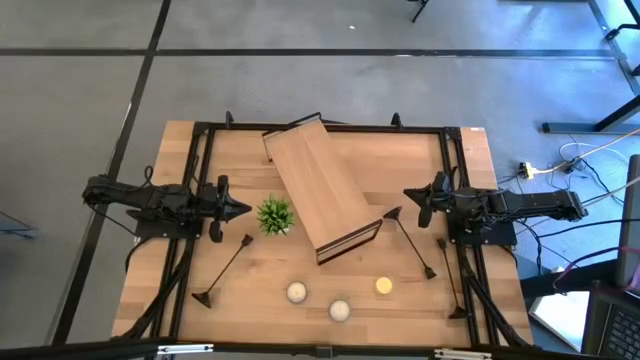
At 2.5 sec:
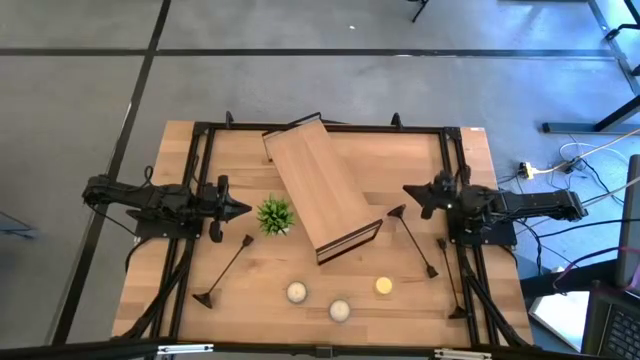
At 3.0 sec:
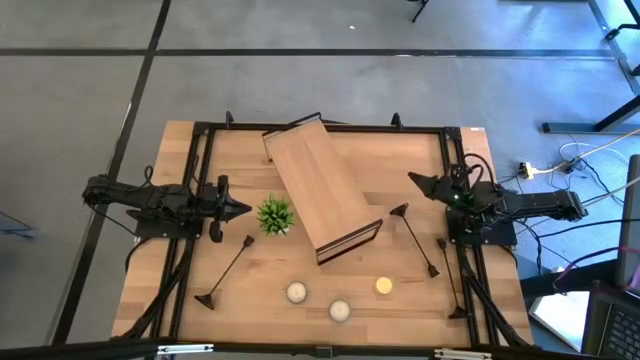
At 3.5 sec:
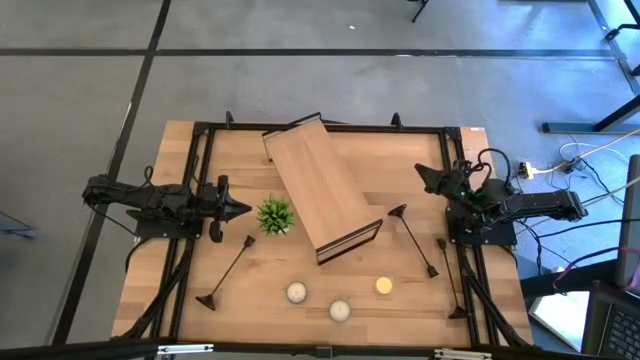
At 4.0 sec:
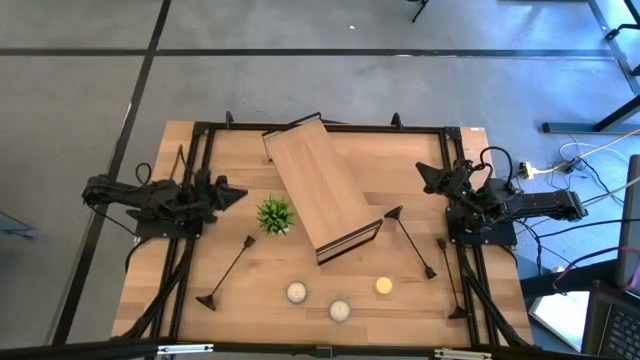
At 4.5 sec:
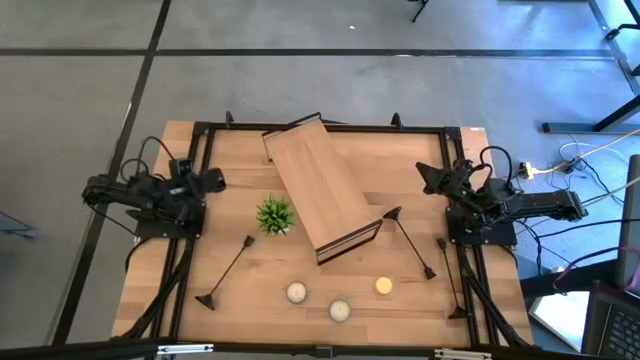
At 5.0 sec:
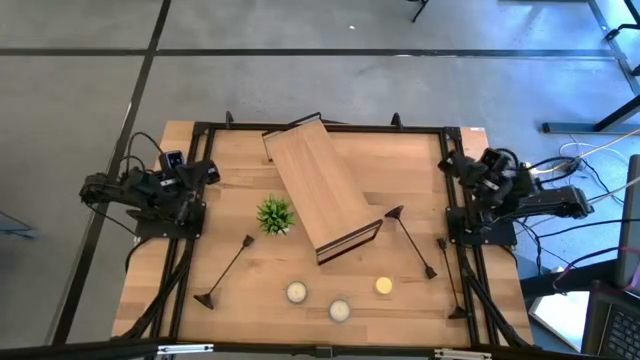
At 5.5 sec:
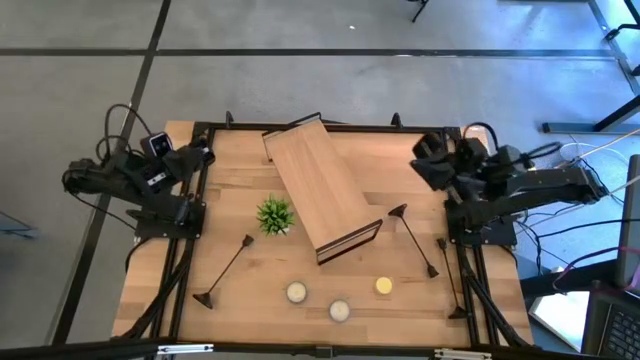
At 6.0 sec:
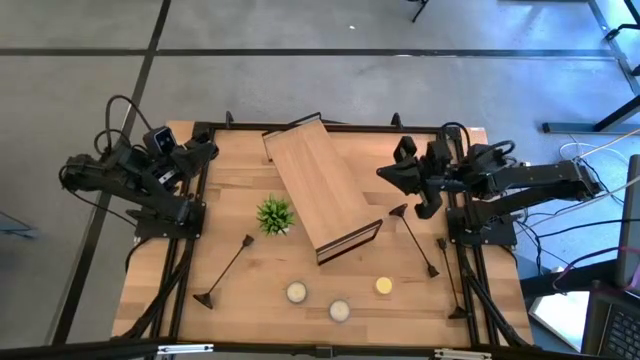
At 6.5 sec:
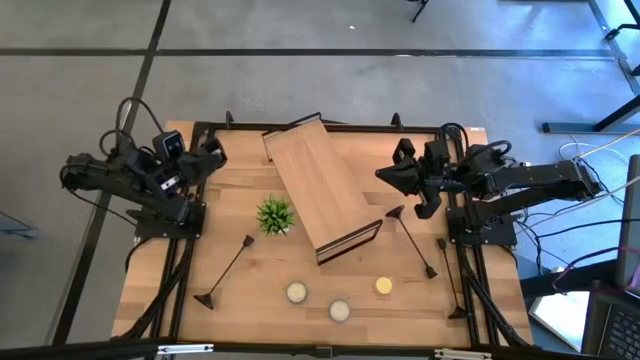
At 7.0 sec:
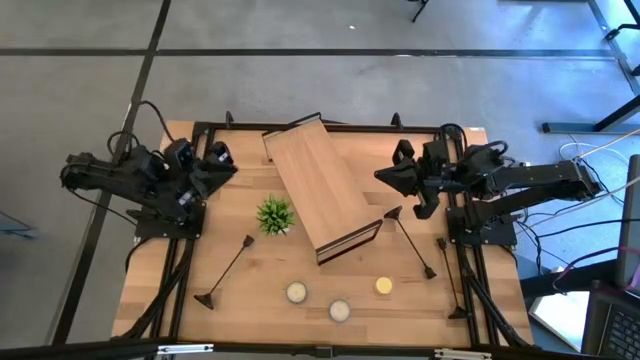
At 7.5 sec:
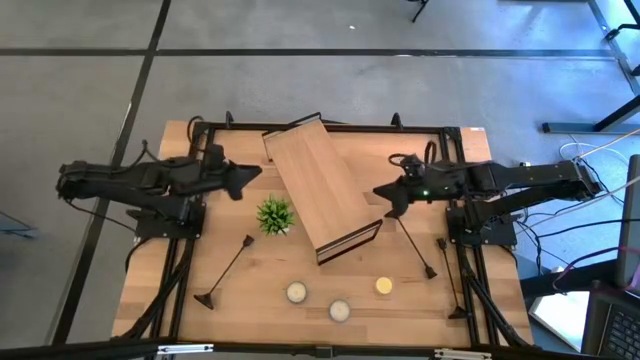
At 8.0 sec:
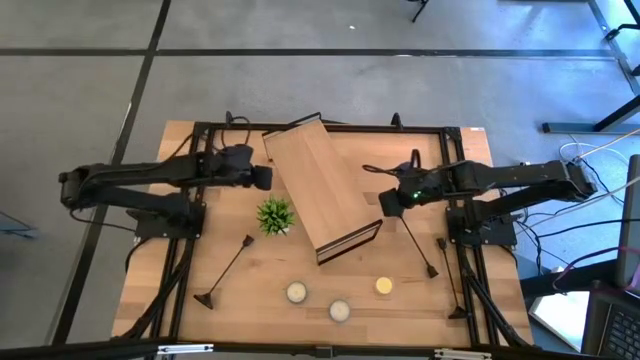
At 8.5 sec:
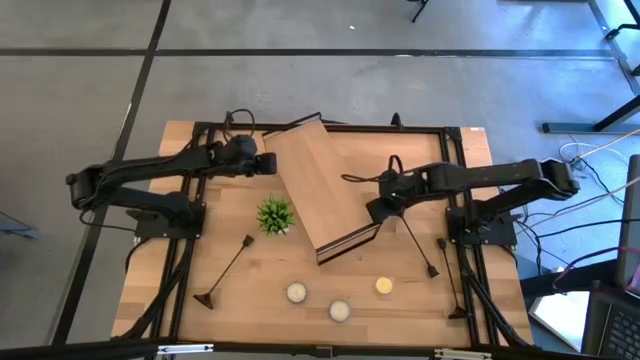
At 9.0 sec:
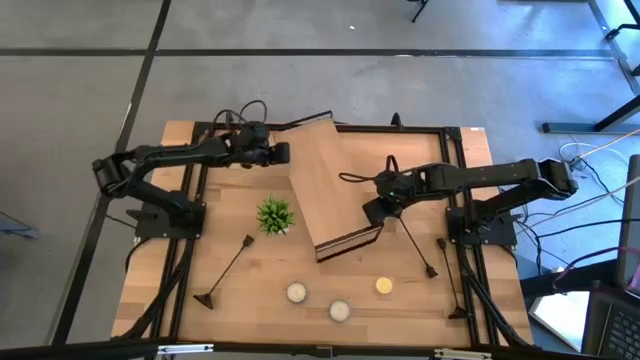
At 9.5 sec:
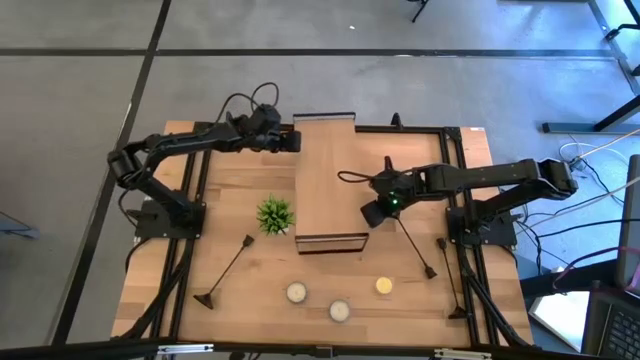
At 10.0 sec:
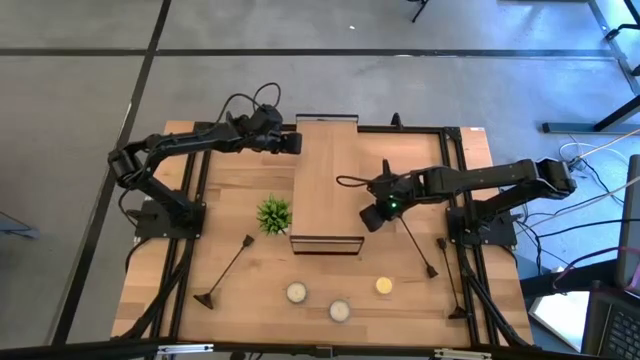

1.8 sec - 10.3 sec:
Task: Pick & Place candle stick holders
Adjust the shelf on the table

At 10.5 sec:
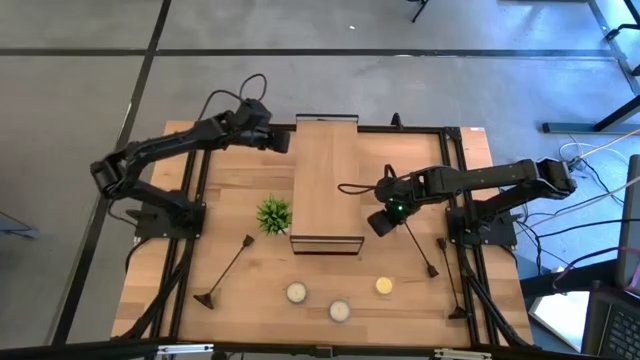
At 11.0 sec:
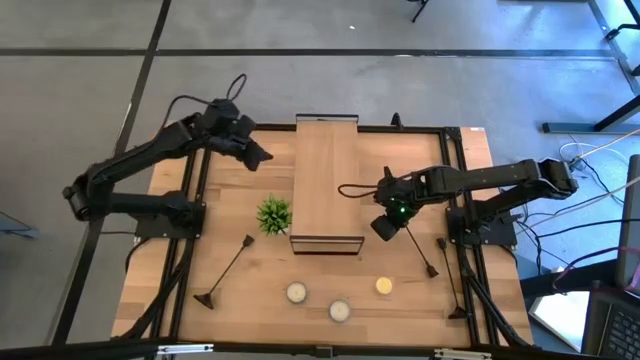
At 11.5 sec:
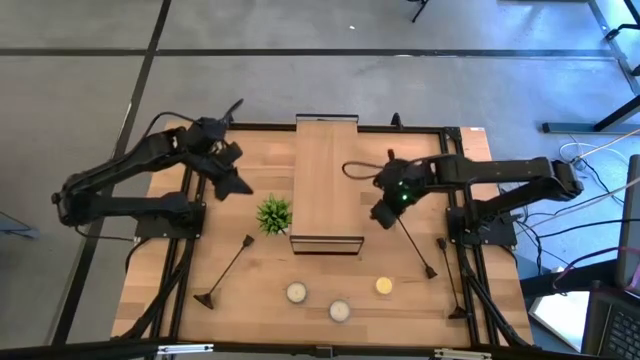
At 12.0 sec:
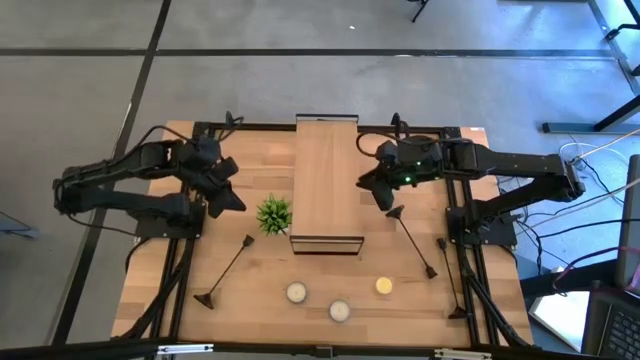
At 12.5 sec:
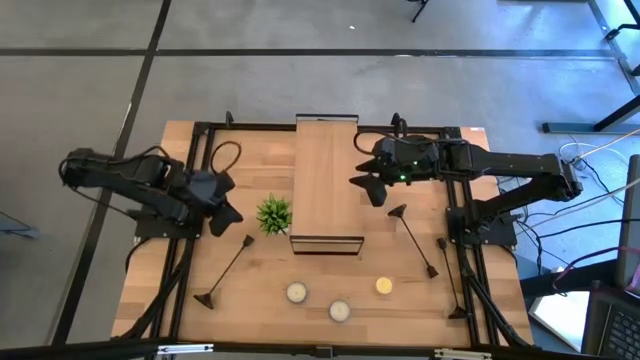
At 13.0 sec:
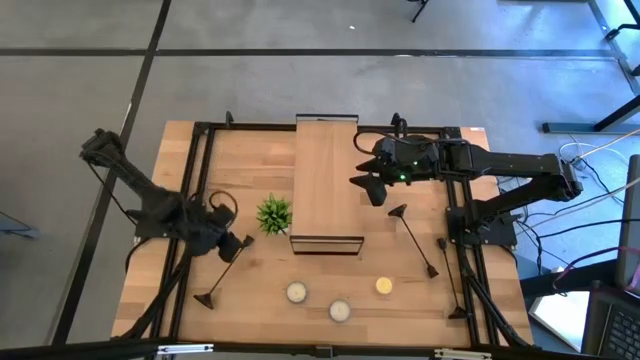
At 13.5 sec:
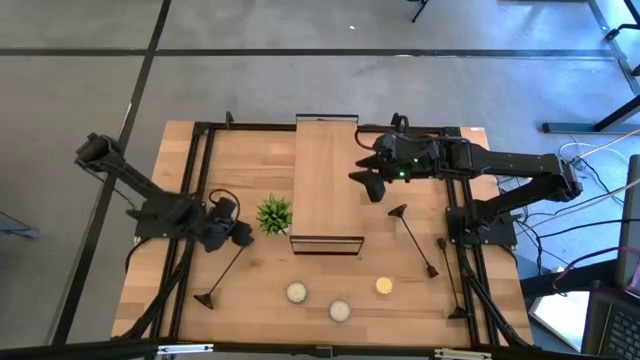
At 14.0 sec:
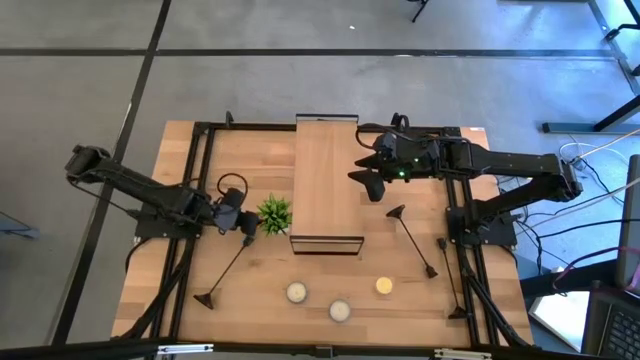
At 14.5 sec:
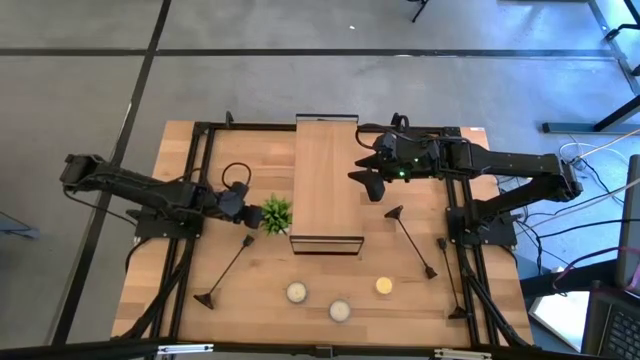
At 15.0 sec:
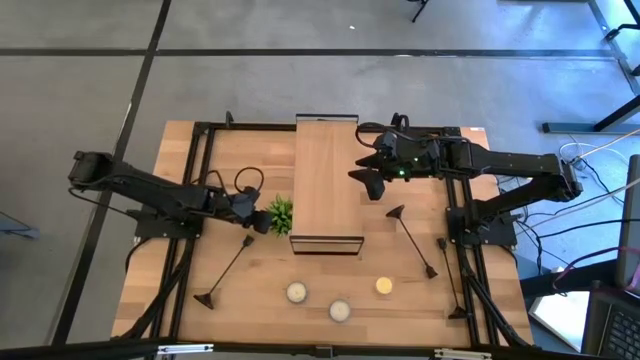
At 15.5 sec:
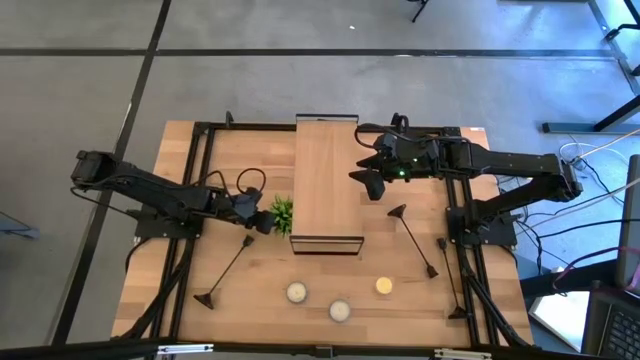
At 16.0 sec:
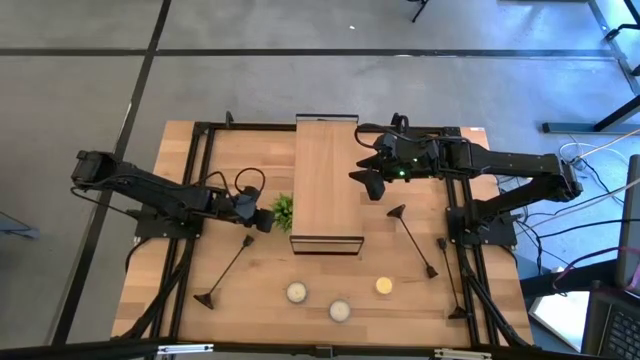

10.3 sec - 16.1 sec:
Put the plant pot on the shelf

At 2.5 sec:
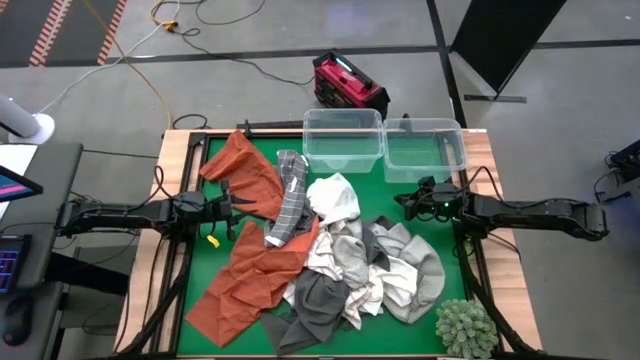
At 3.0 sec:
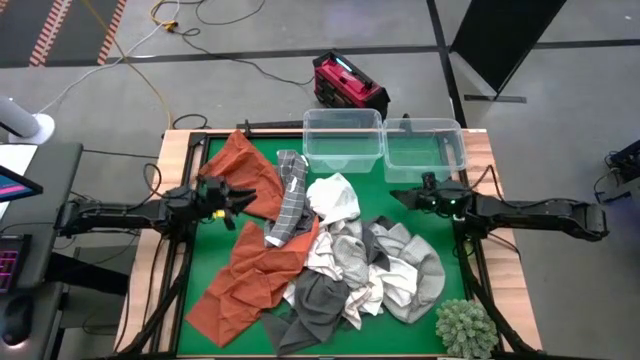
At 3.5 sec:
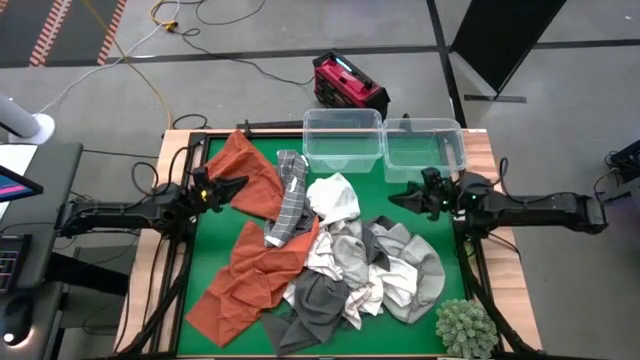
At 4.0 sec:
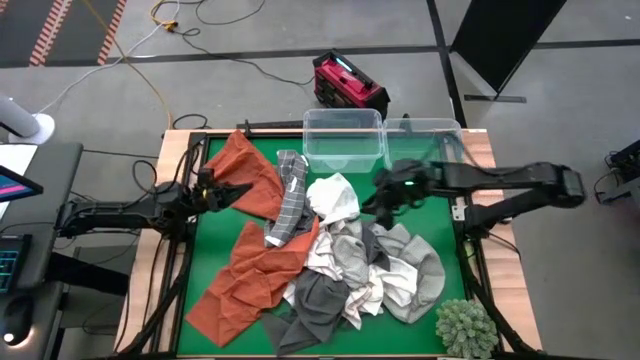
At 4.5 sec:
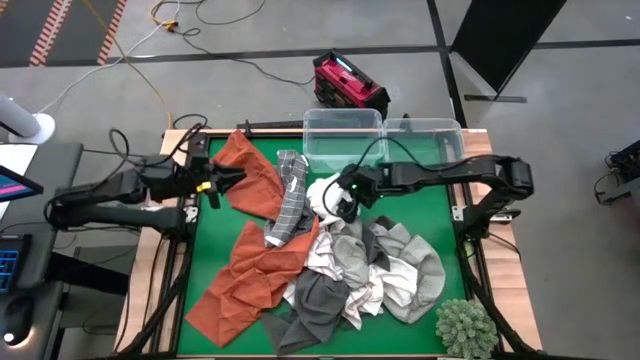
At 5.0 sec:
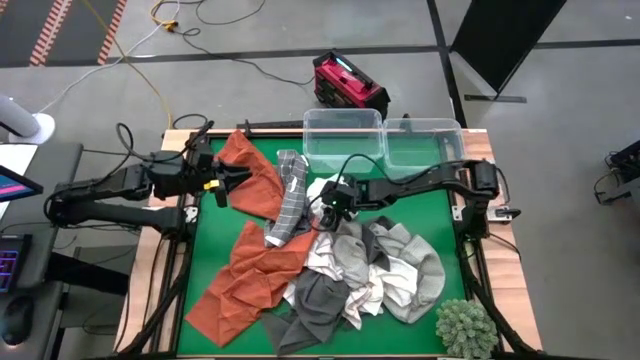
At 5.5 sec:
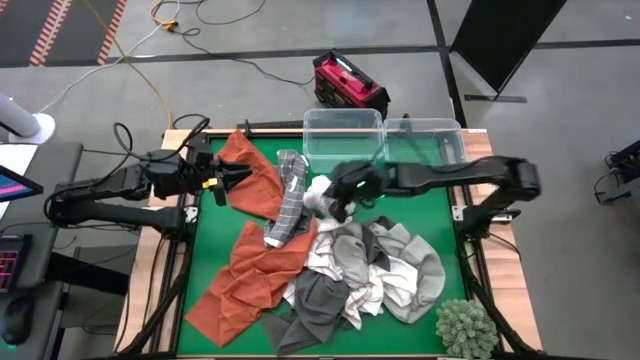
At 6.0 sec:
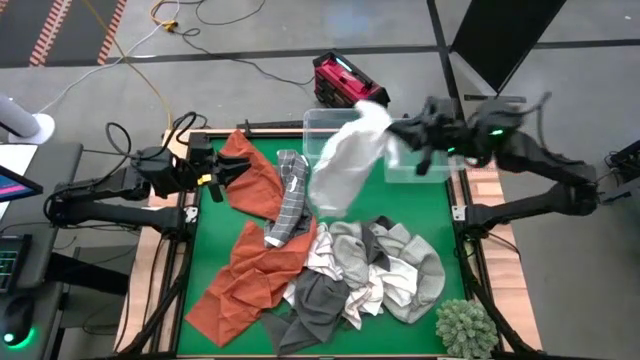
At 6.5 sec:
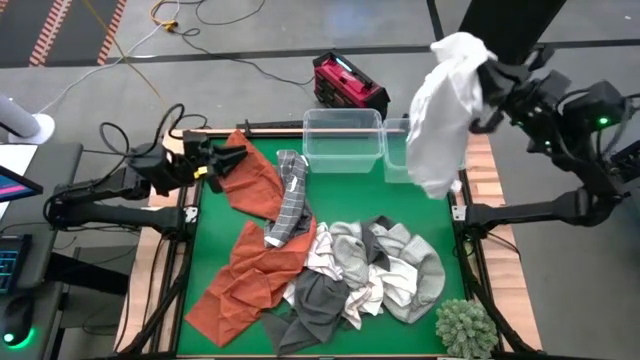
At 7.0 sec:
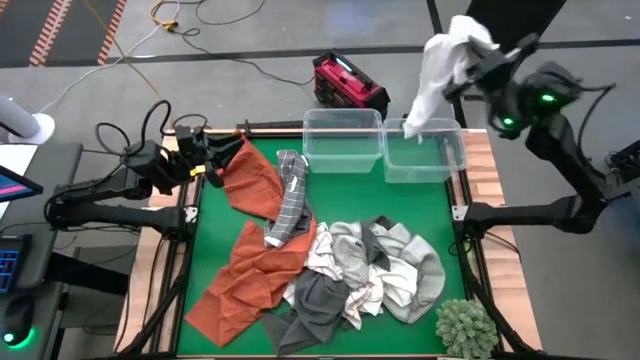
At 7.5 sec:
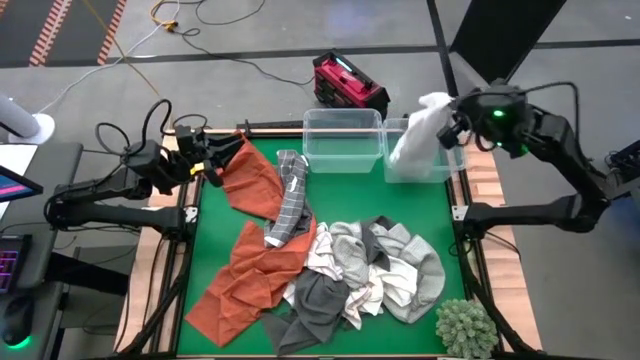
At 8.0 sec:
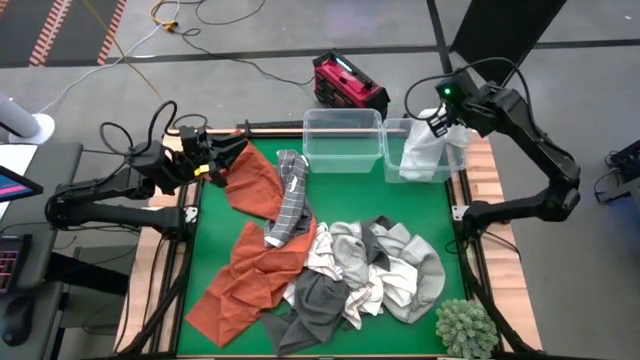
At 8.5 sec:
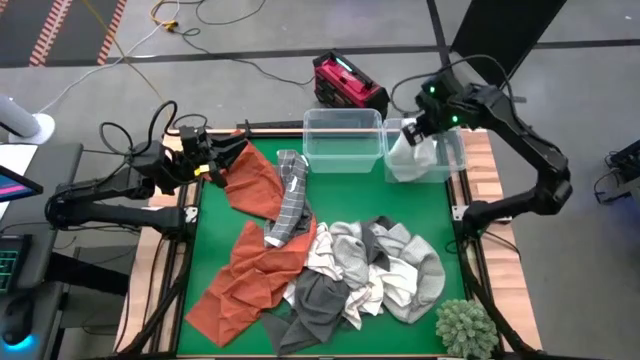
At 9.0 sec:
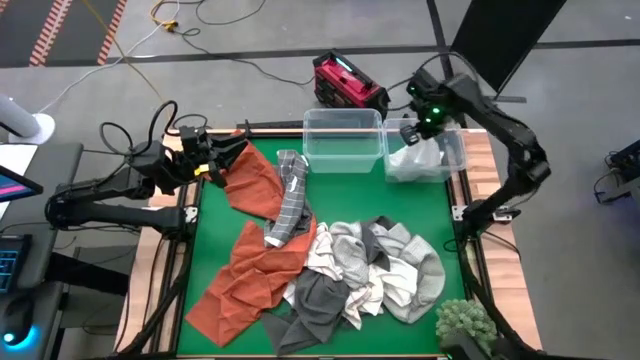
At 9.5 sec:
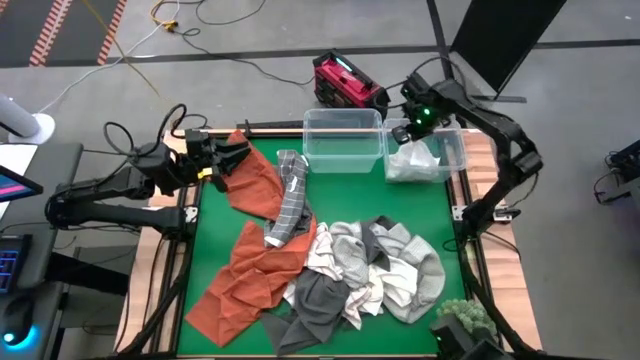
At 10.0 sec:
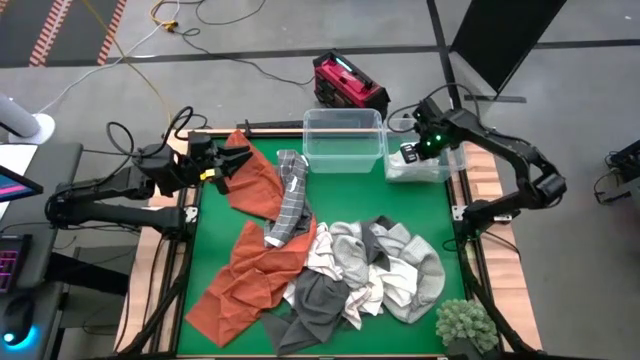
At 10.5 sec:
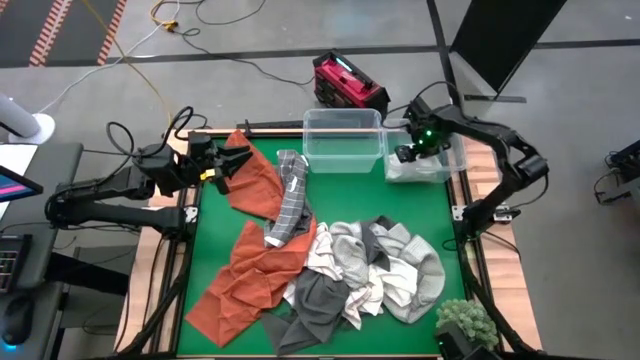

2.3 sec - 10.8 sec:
Task: Sort towels by color in basket
Put the white towel into the right transparent bin
